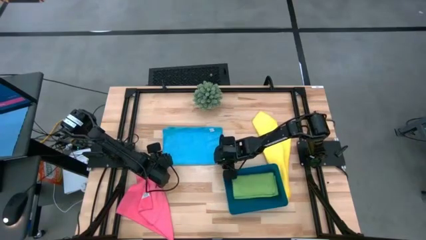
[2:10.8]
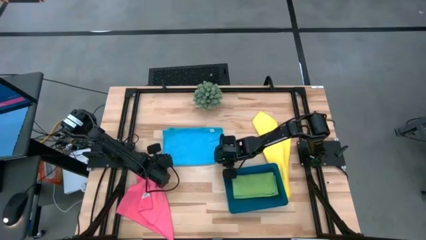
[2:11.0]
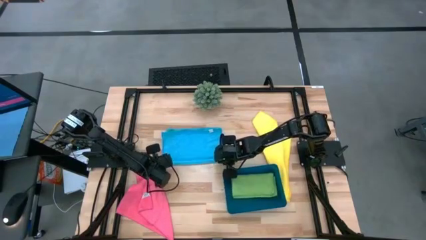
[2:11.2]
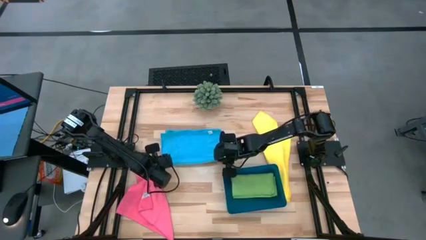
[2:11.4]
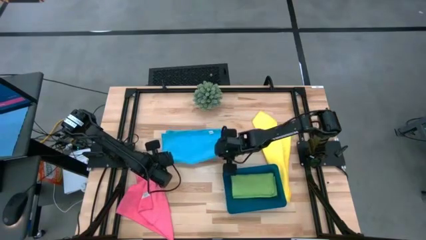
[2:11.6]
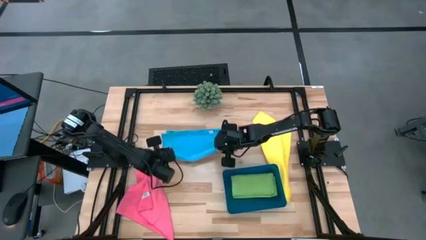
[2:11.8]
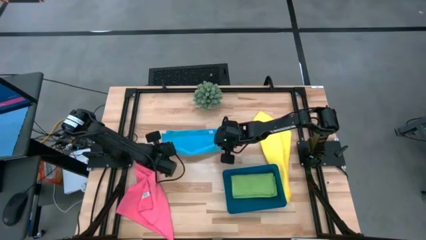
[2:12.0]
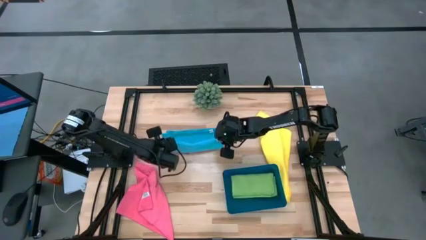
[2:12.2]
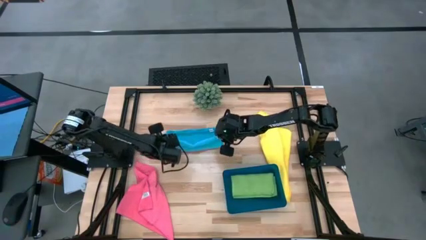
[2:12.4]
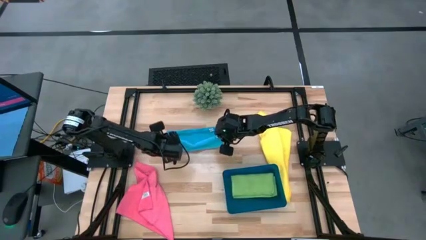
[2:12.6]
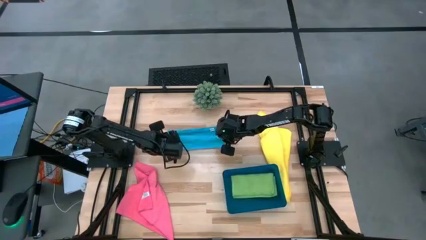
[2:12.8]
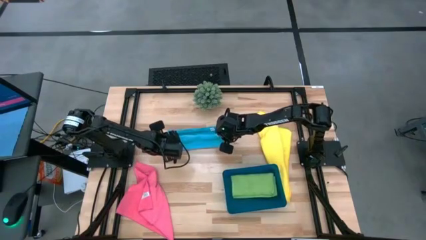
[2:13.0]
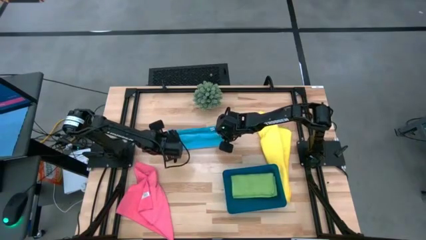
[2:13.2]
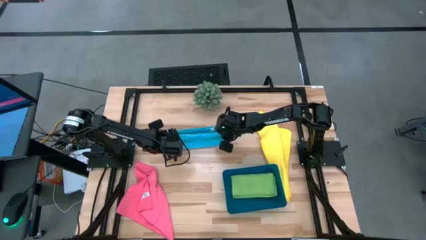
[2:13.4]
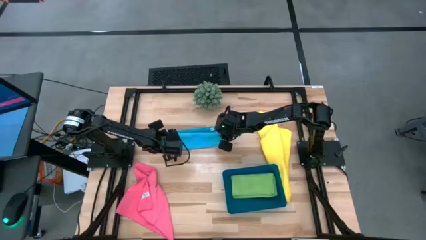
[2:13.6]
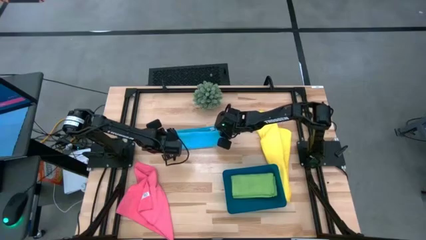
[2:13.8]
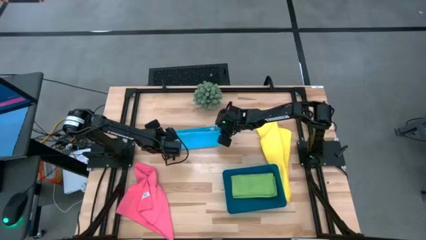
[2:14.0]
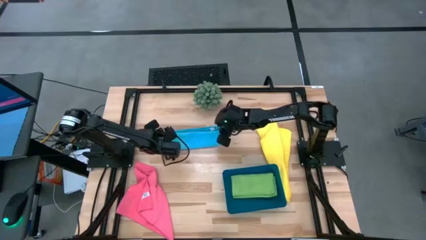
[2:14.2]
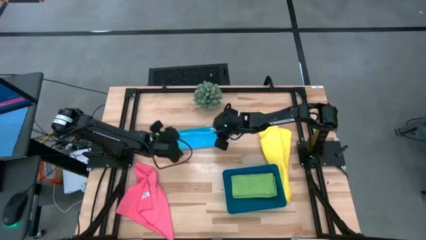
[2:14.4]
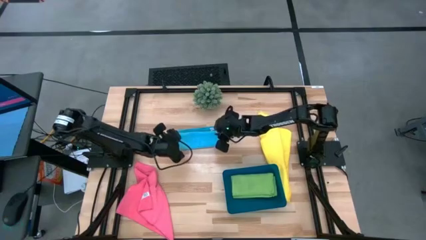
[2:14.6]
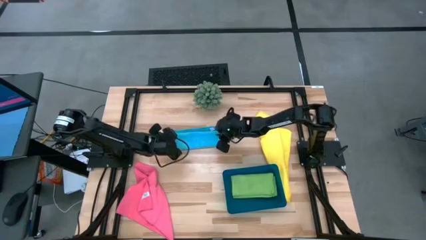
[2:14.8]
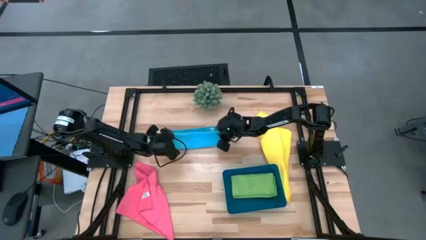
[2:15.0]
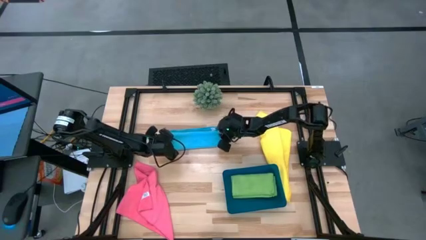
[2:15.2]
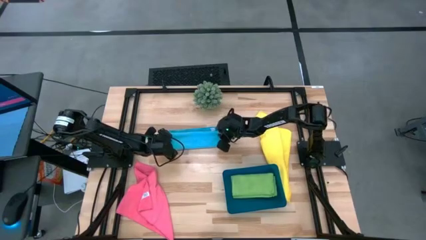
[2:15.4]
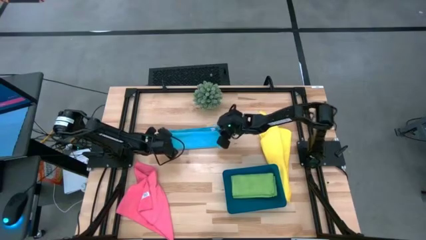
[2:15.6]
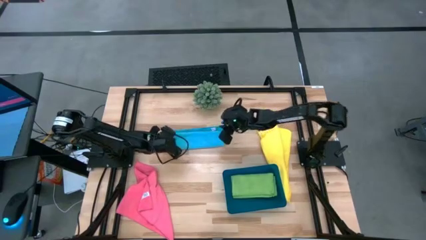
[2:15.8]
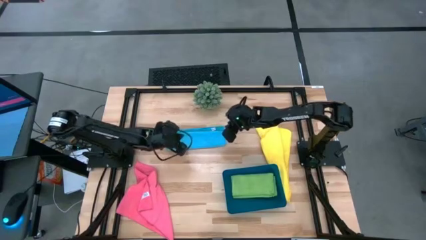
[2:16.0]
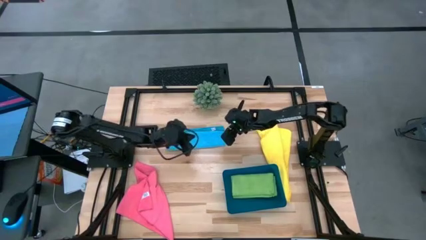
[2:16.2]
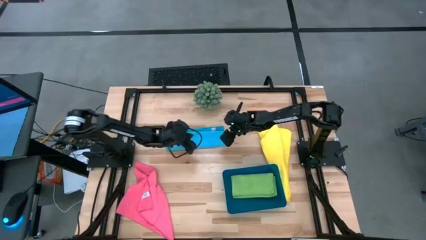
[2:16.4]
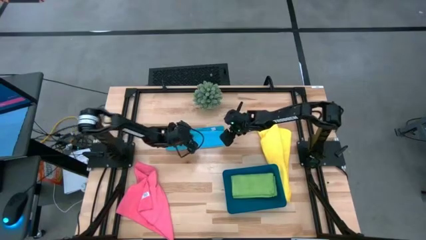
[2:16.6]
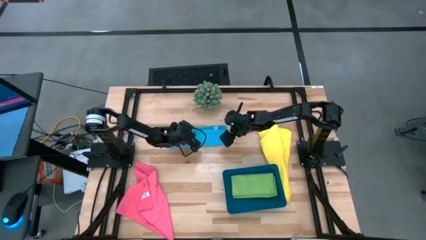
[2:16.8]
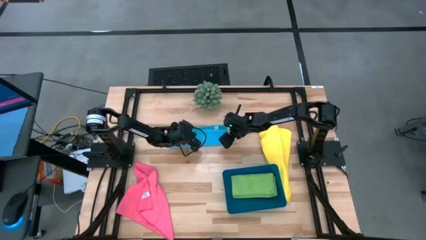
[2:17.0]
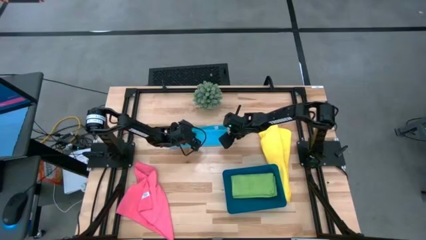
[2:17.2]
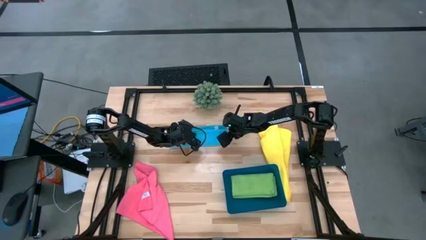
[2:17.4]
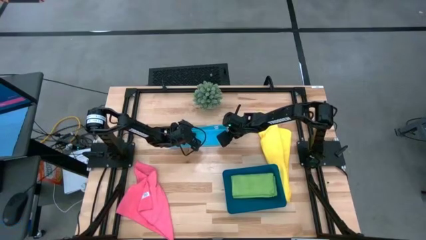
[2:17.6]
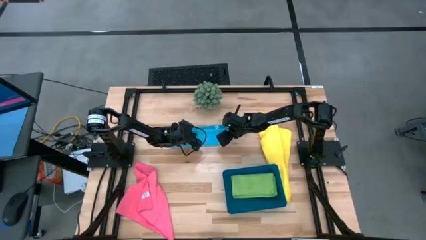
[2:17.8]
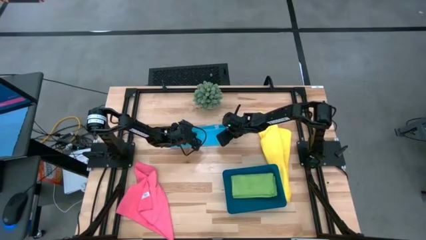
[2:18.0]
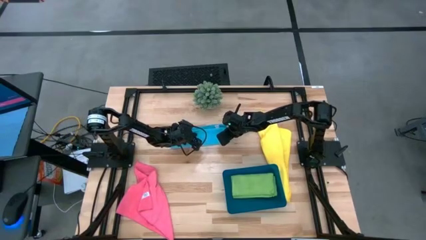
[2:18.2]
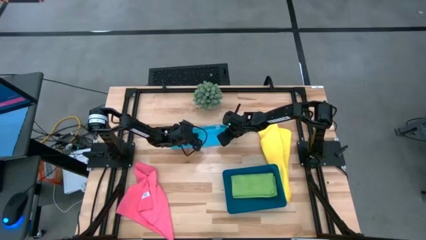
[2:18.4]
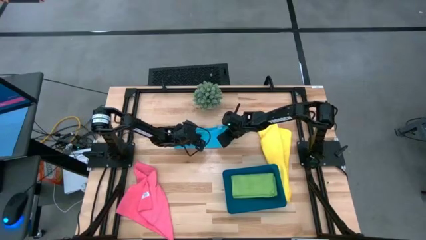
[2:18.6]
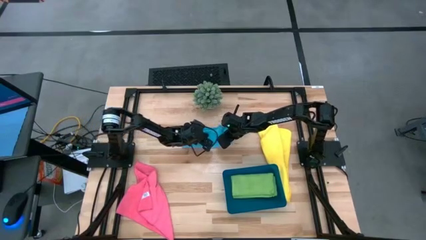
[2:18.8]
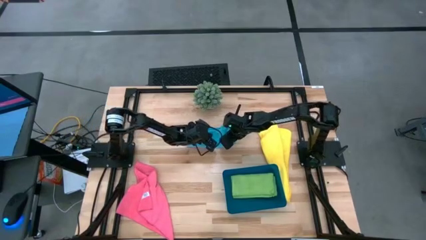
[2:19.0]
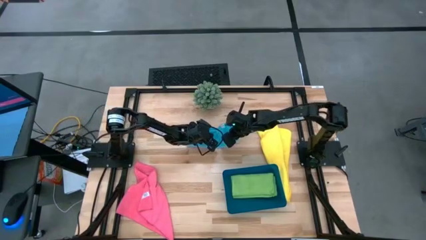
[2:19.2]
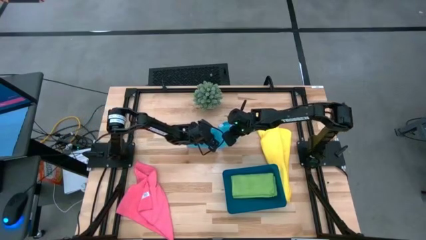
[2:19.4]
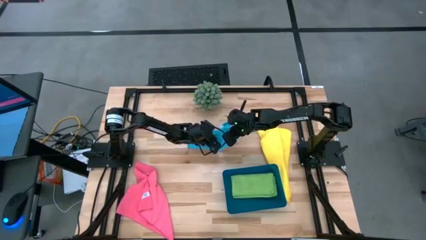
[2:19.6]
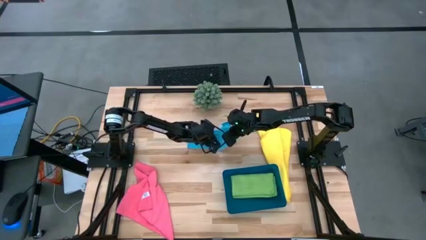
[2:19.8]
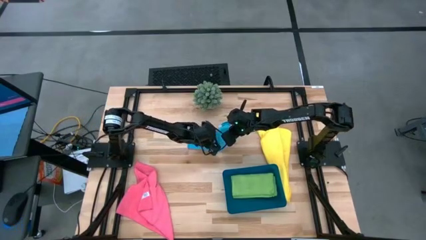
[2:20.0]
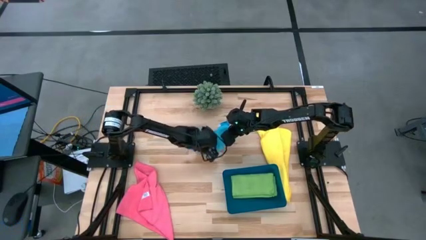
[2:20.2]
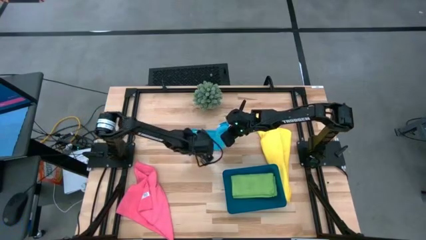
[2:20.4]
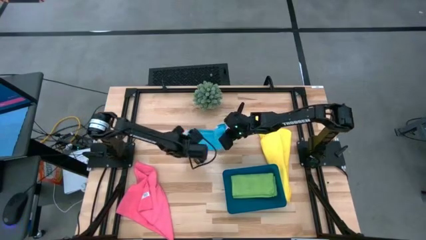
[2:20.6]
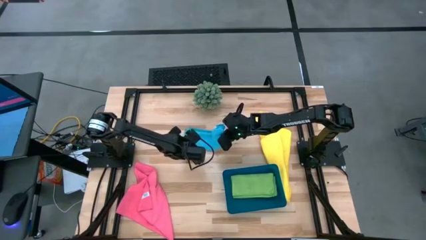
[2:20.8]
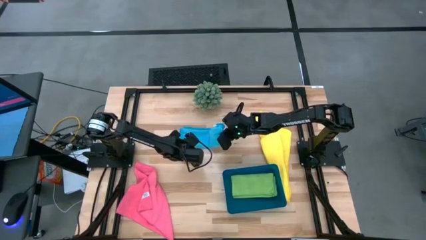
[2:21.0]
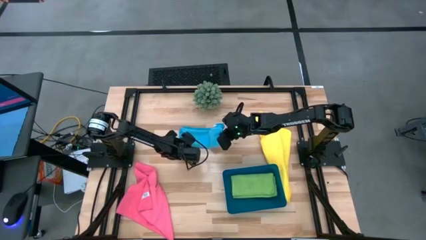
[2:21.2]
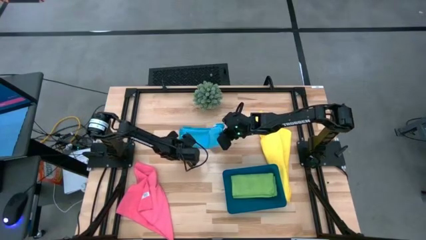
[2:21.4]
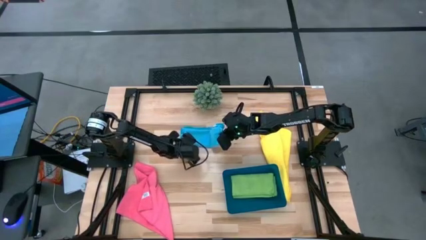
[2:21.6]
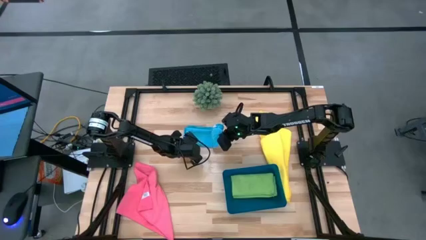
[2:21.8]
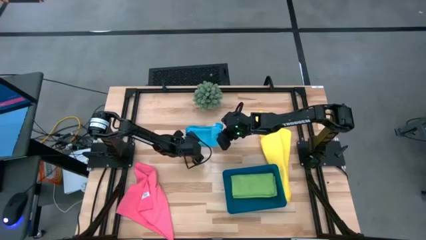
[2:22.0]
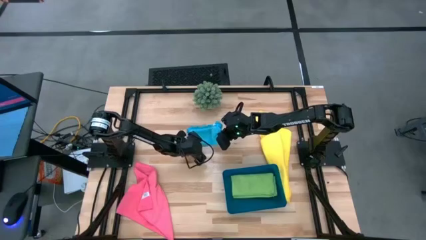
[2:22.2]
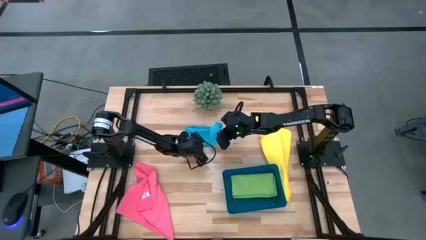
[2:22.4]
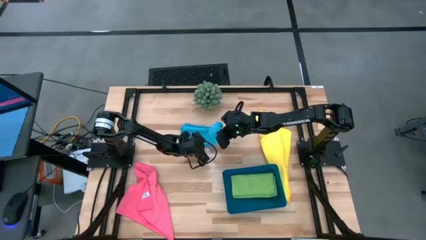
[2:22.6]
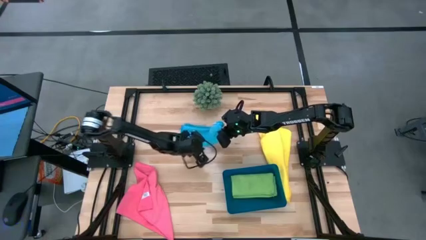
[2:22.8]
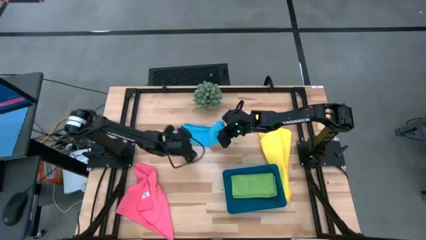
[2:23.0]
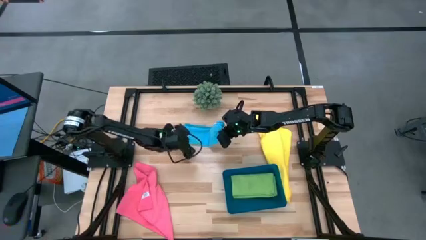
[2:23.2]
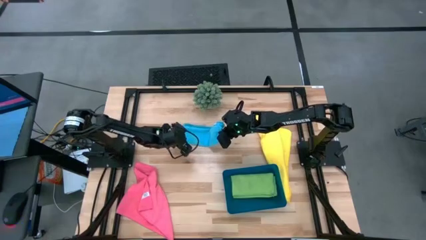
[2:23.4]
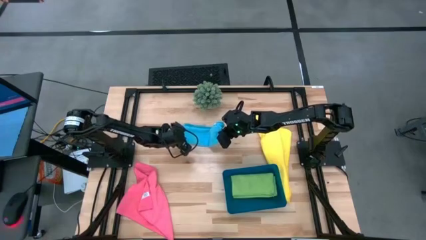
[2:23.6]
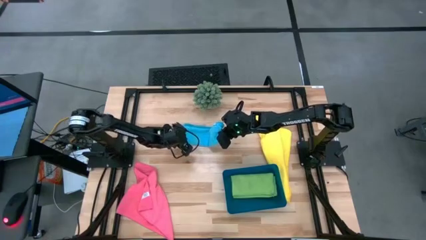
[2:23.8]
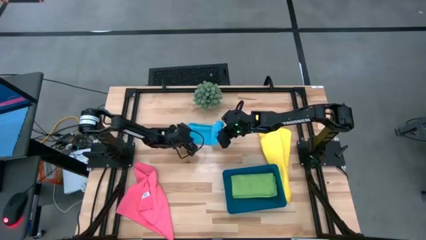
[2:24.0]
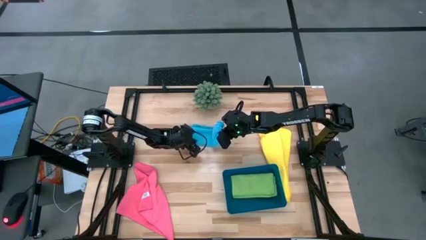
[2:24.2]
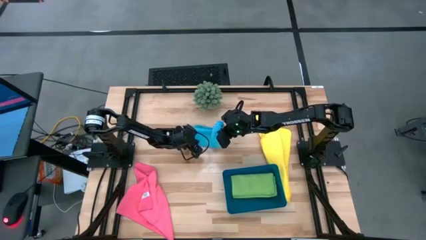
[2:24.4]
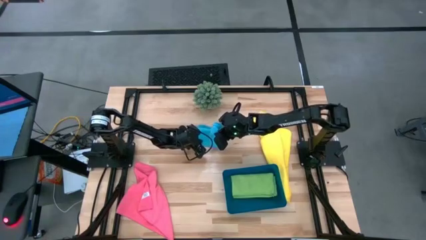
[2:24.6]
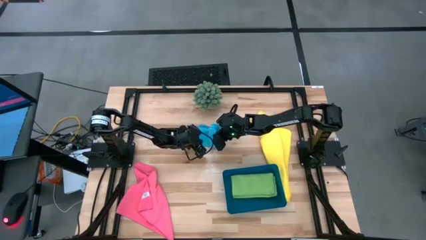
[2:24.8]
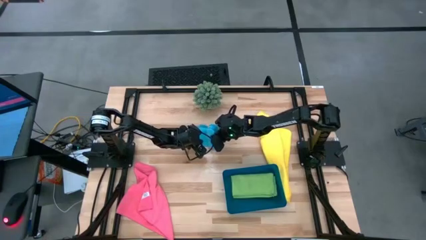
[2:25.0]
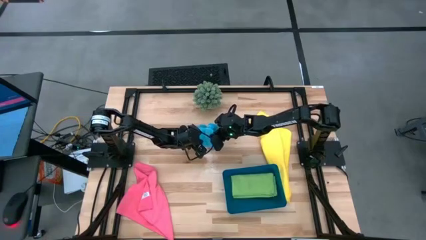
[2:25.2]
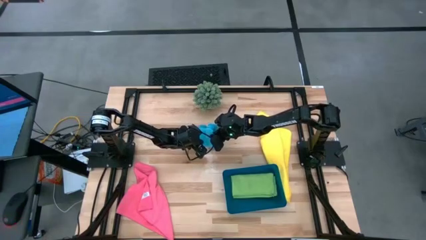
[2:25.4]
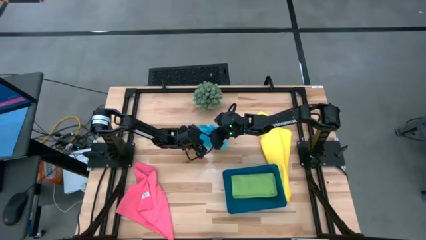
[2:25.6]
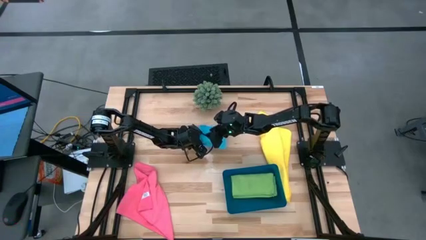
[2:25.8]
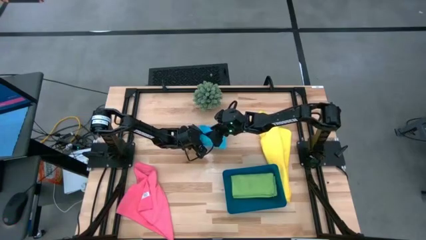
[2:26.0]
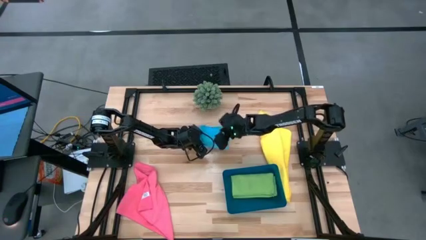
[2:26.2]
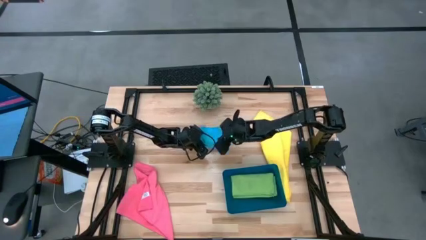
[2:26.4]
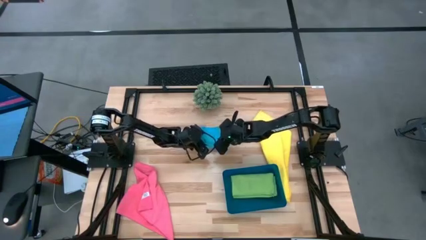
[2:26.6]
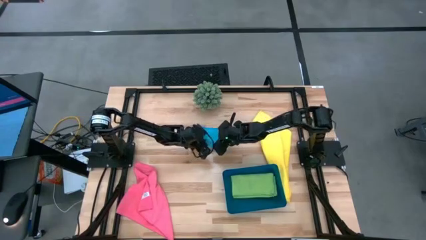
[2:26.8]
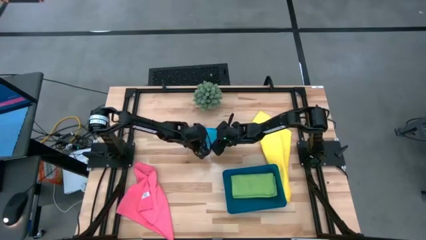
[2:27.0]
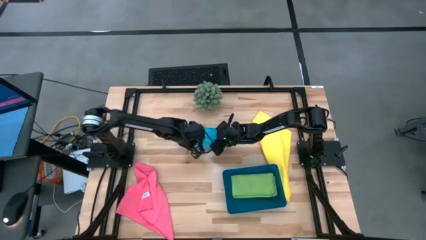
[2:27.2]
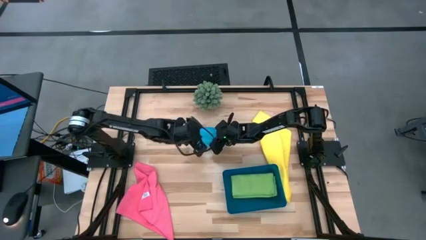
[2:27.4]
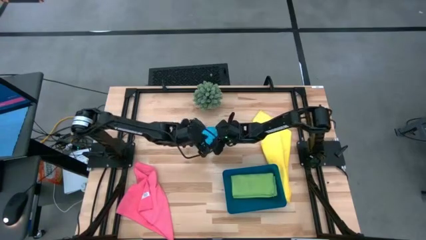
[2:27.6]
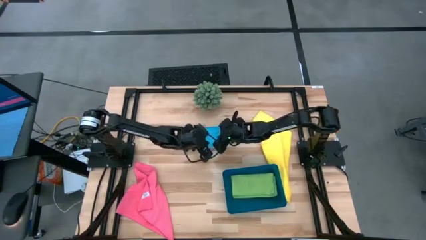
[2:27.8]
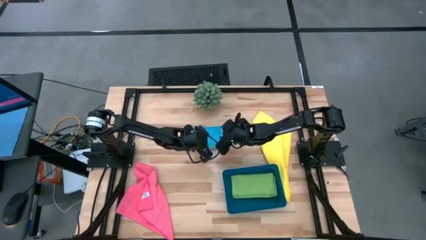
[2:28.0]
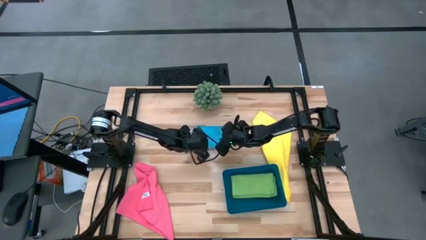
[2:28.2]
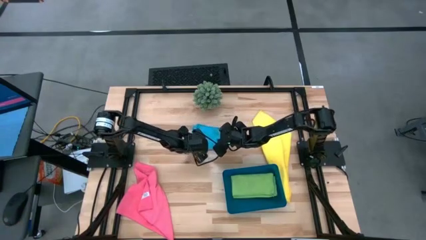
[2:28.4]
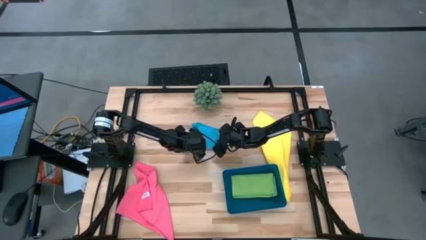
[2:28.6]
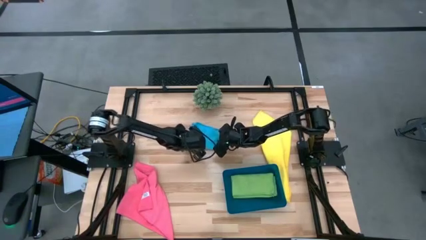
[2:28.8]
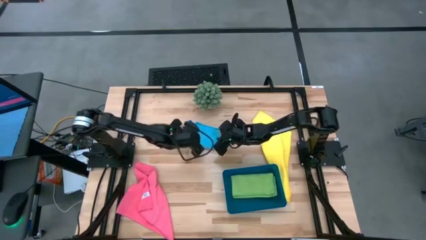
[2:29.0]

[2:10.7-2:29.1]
Task: Fold microfiber towels
Fold the blue microfiber cloth
